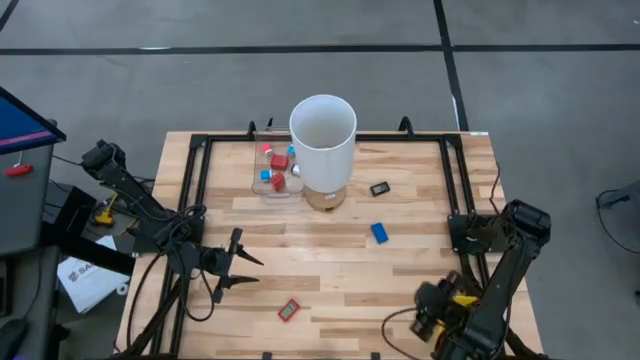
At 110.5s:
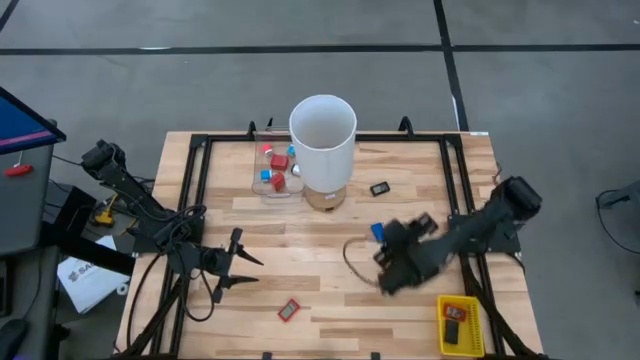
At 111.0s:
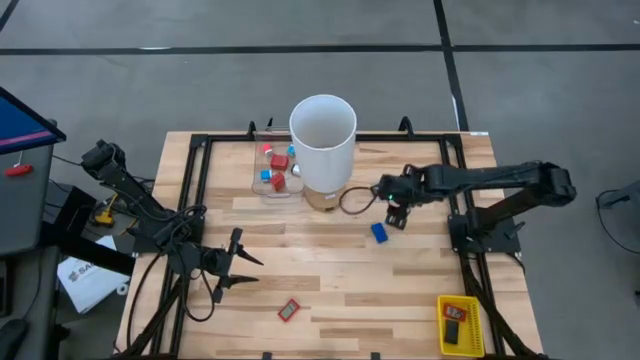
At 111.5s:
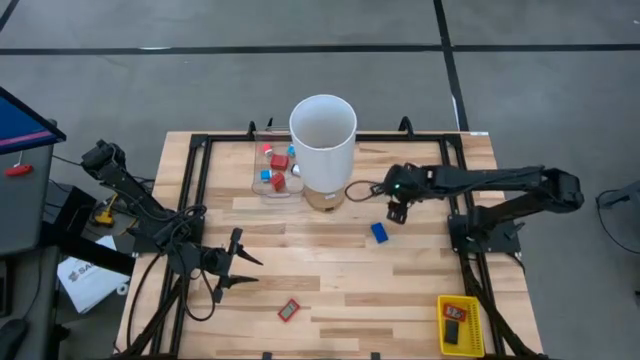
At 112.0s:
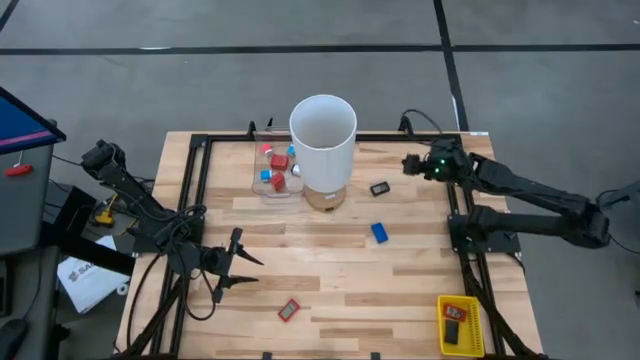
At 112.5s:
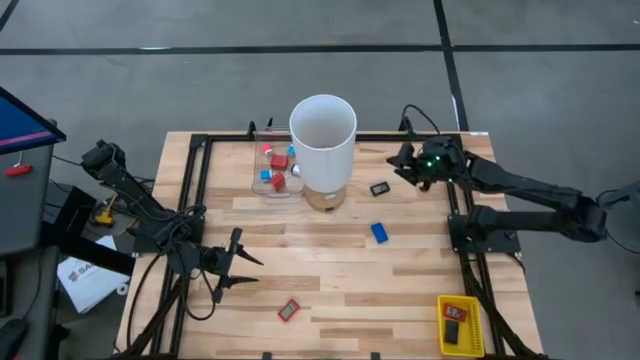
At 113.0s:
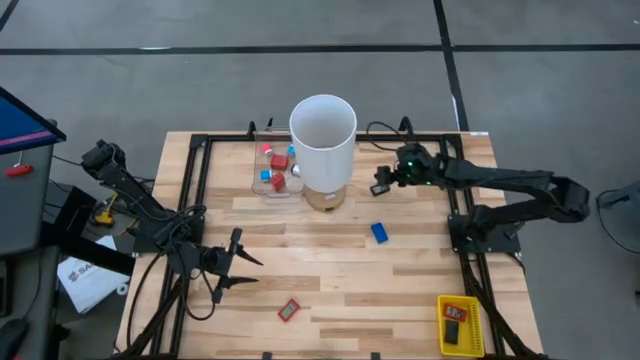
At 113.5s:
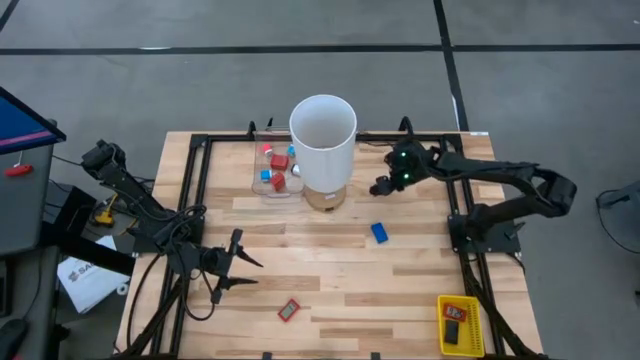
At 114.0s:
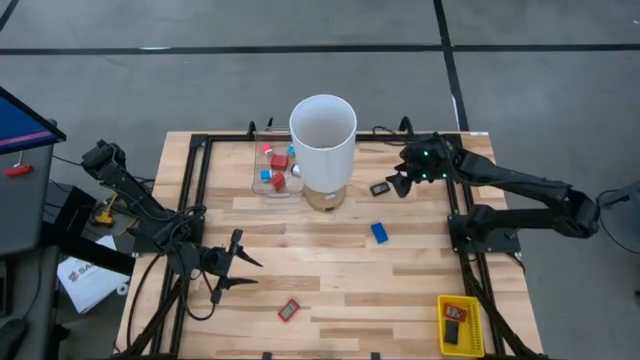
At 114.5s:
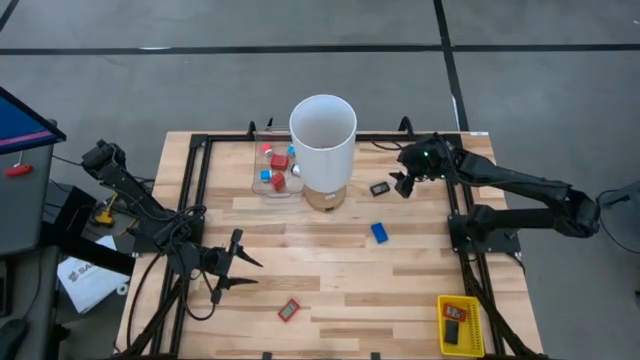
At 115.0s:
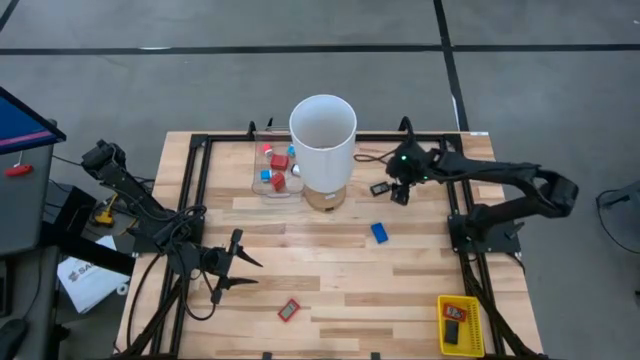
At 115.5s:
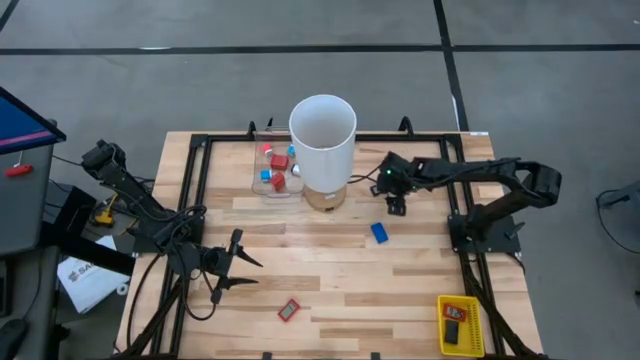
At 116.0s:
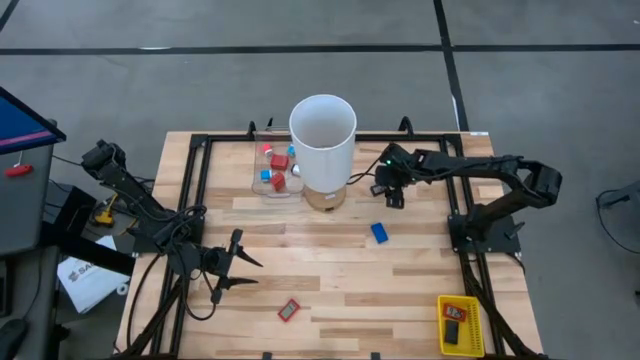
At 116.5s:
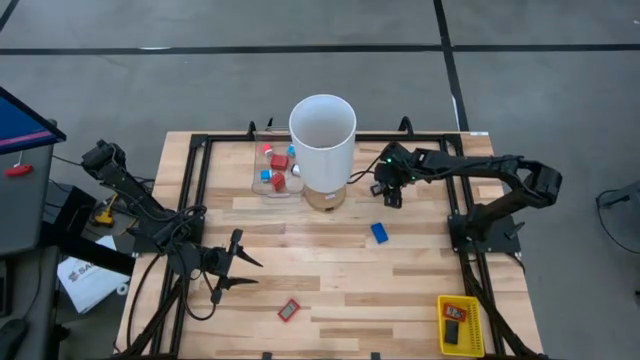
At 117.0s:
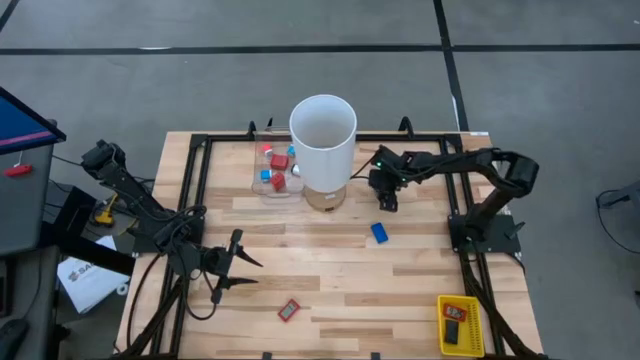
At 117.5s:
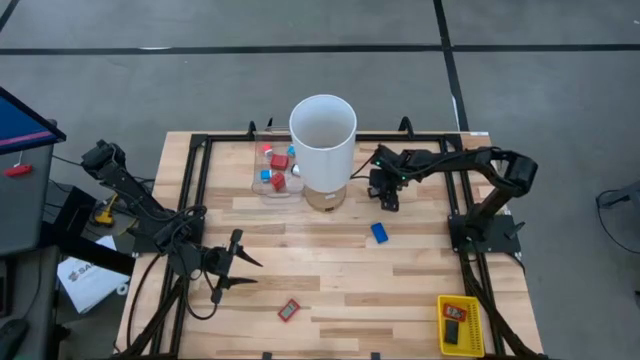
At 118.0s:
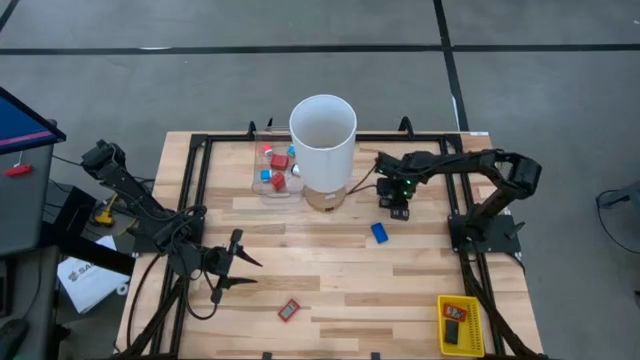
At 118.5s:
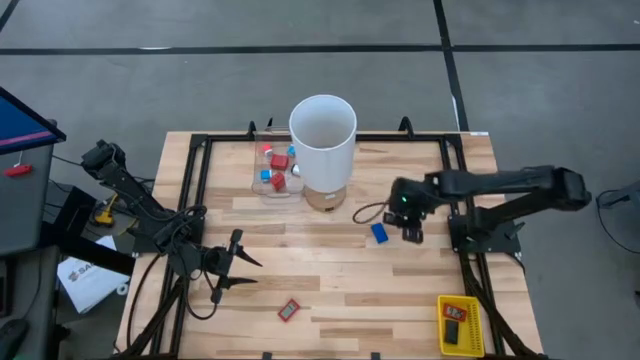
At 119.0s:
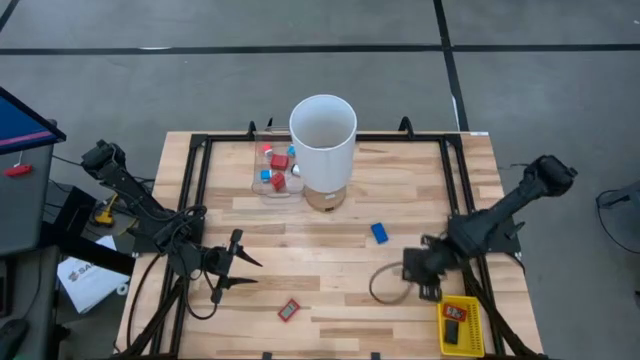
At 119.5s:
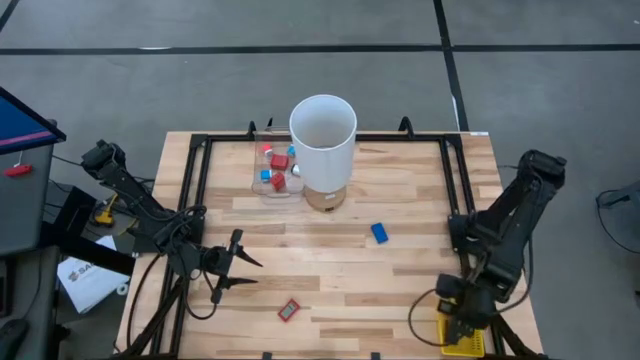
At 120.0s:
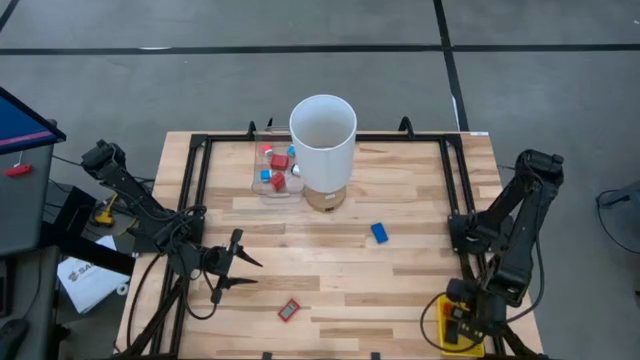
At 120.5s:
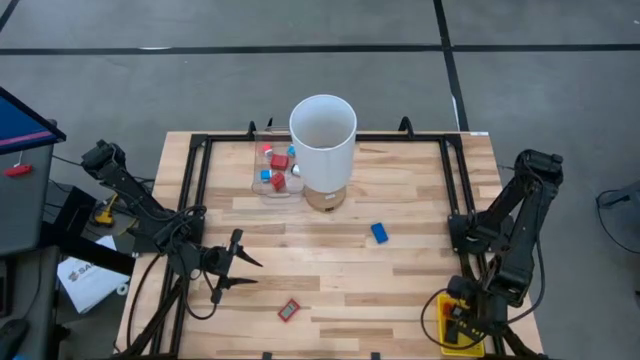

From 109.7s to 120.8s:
Task: Pick & Place Office items
Put the black digital timer into the yellow basket

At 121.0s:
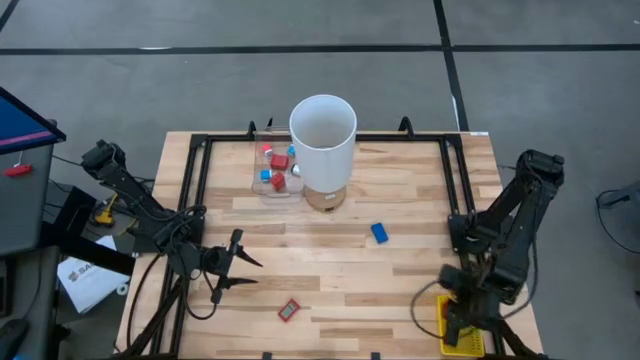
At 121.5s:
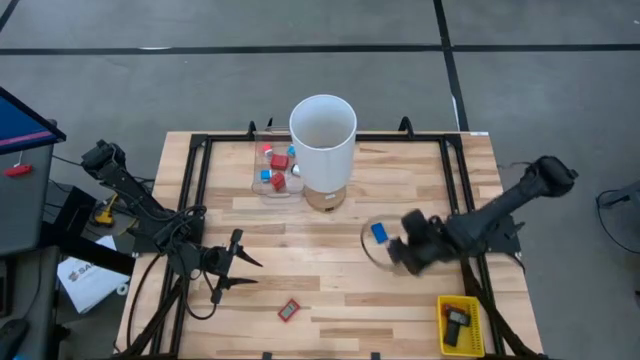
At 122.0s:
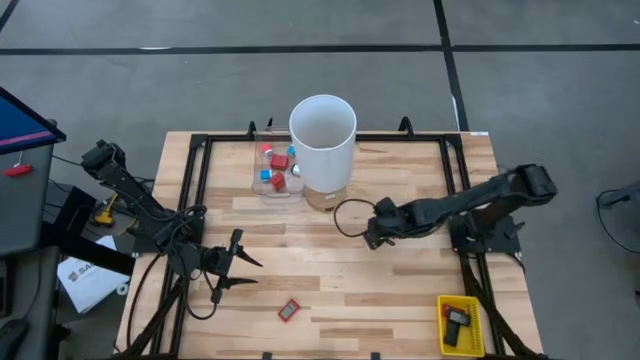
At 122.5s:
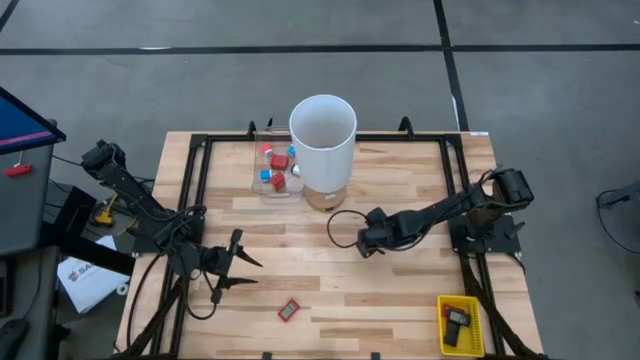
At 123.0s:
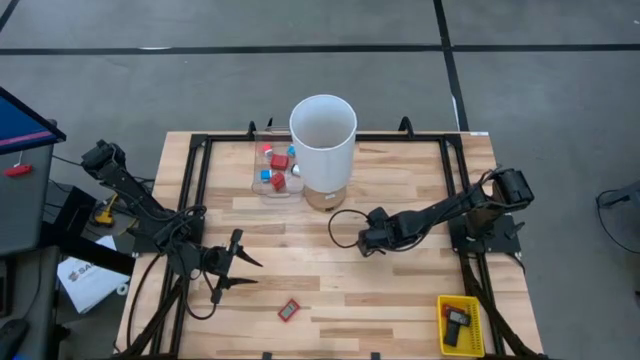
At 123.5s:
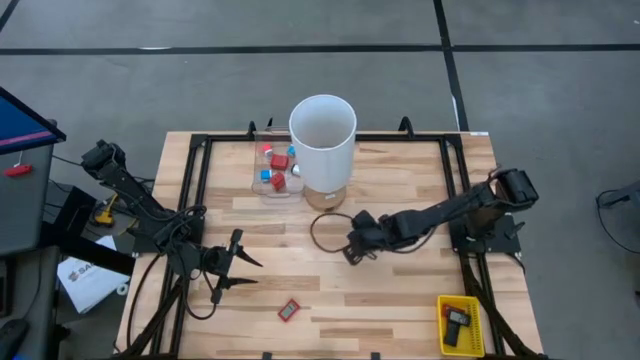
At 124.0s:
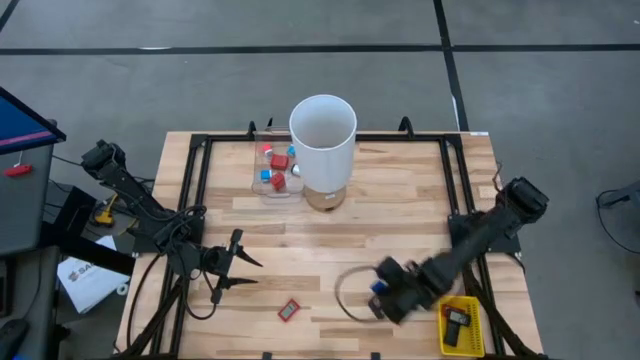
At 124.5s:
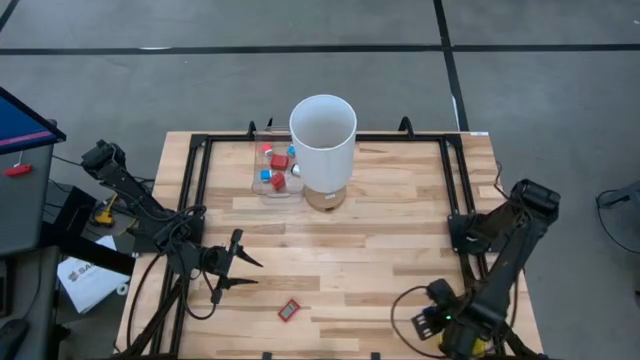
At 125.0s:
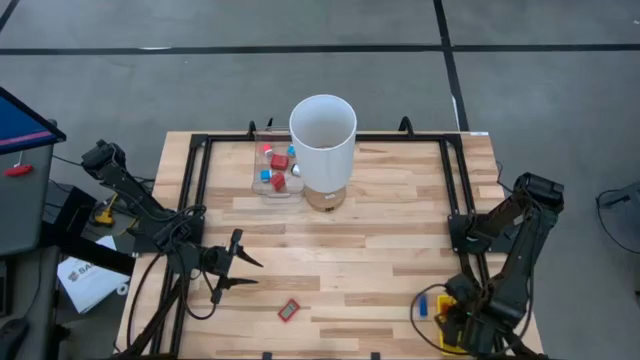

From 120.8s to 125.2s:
Put the blue digital timer into the yellow basket

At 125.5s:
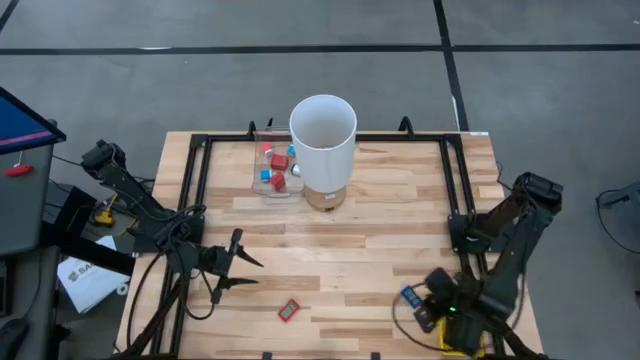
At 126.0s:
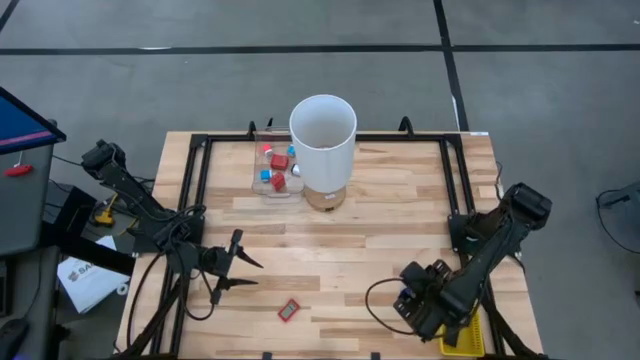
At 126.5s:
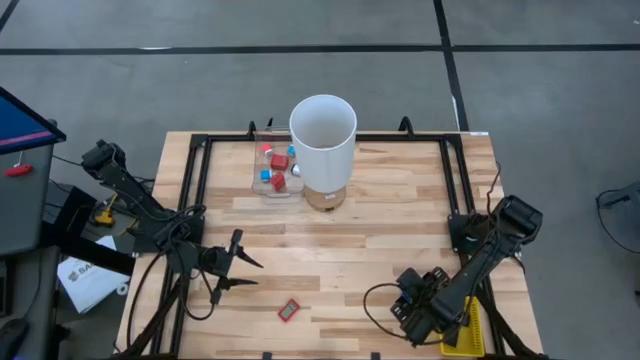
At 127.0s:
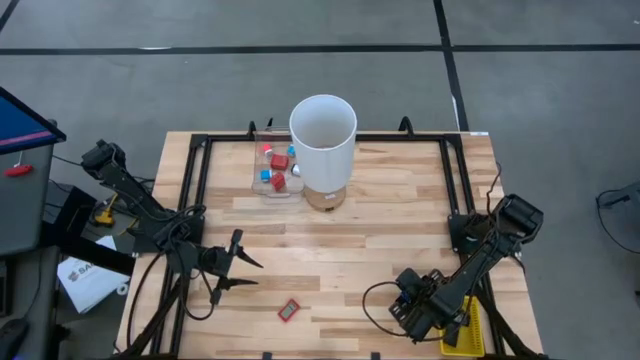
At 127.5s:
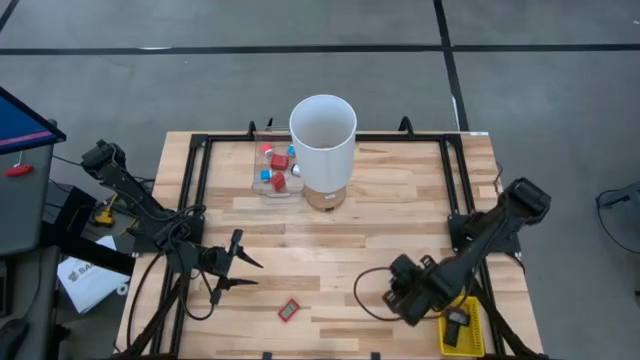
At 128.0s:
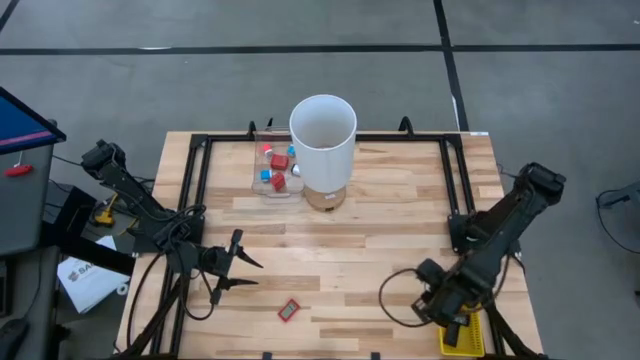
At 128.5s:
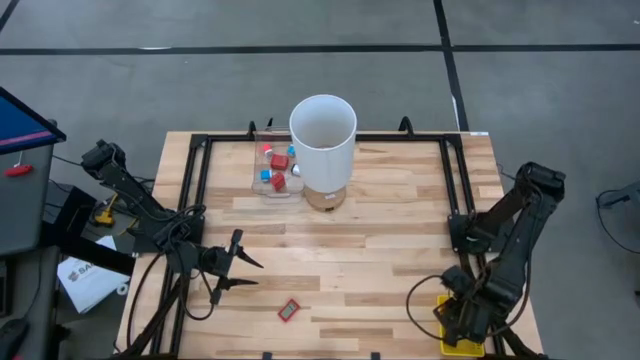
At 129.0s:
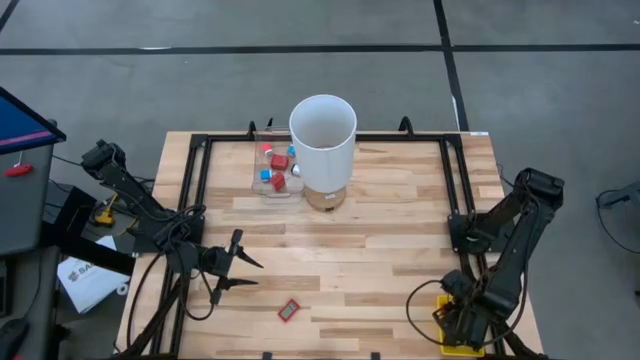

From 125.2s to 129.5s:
Put the blue digital timer into the yellow basket

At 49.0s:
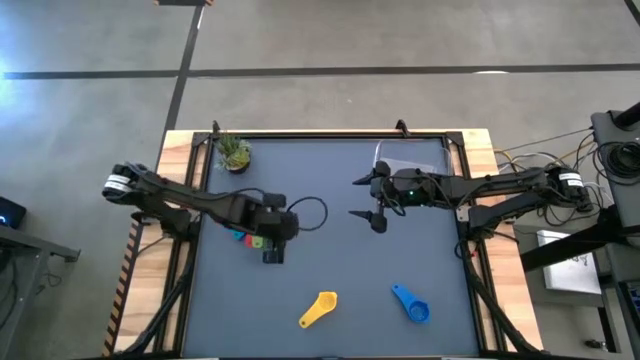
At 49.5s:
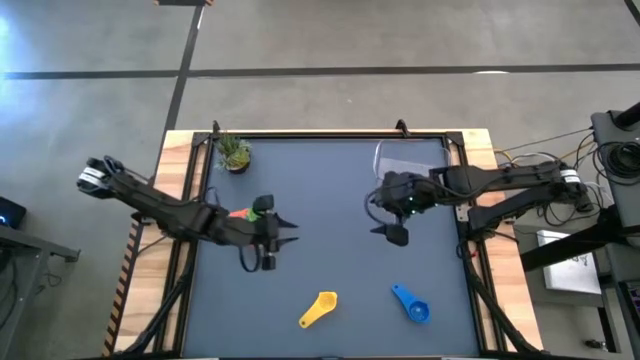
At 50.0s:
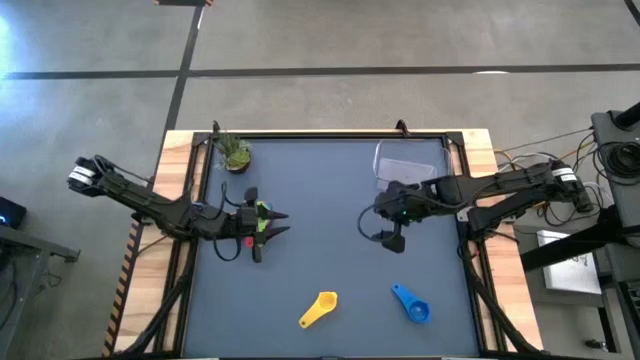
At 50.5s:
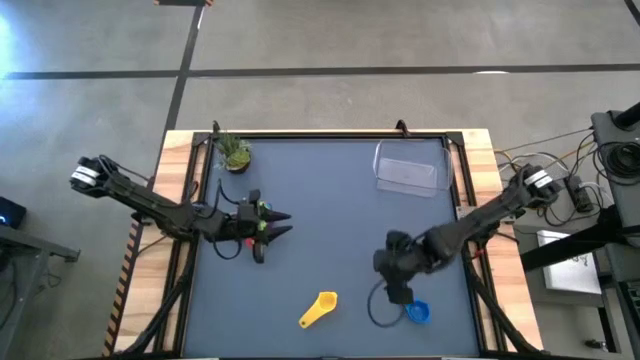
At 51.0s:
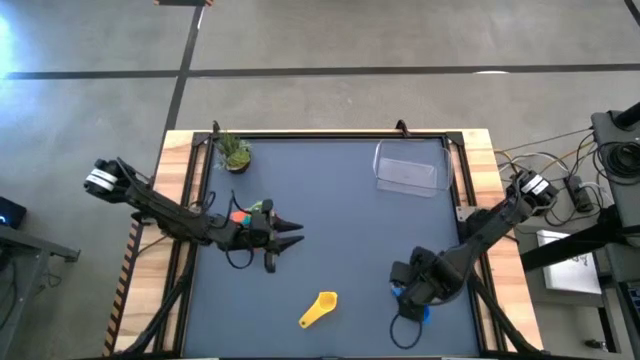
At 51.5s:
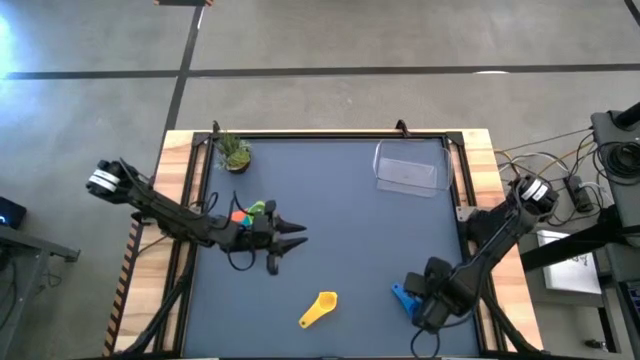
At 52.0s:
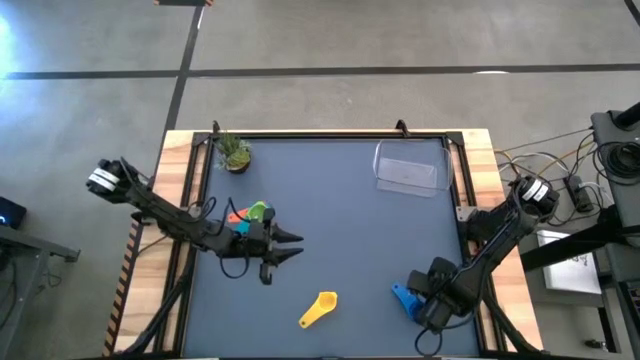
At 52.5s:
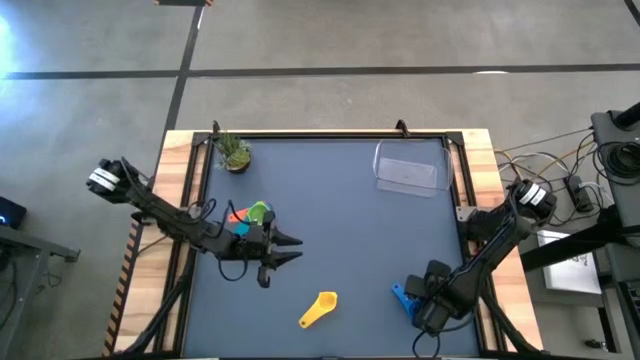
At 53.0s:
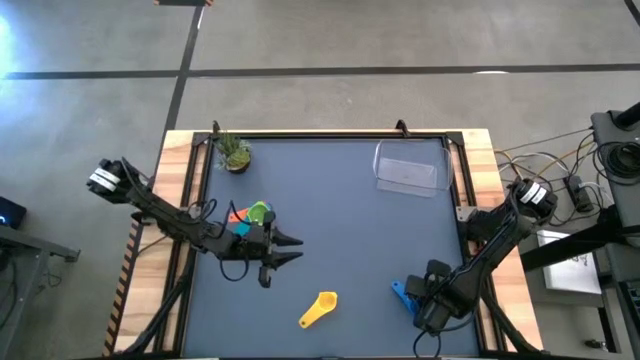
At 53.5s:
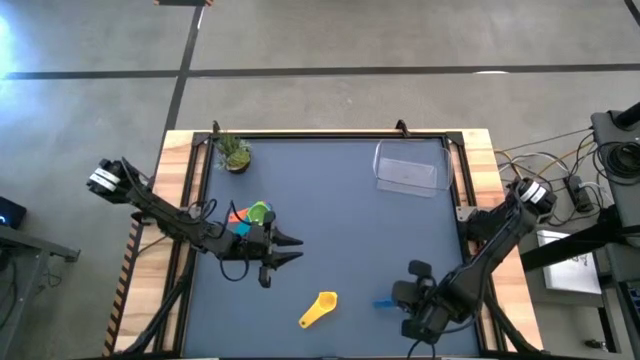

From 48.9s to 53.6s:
Task: Nest measuring cups in basket
Stack the dark blue measuring cup on top of the green measuring cup
